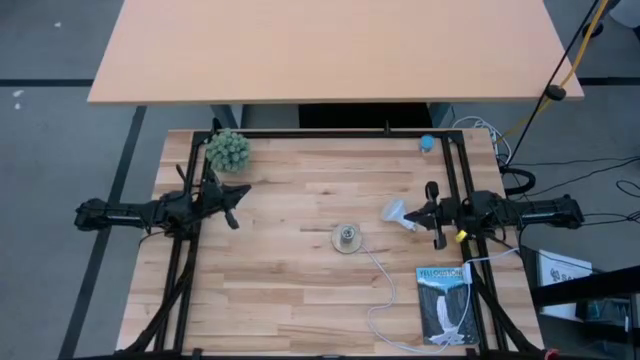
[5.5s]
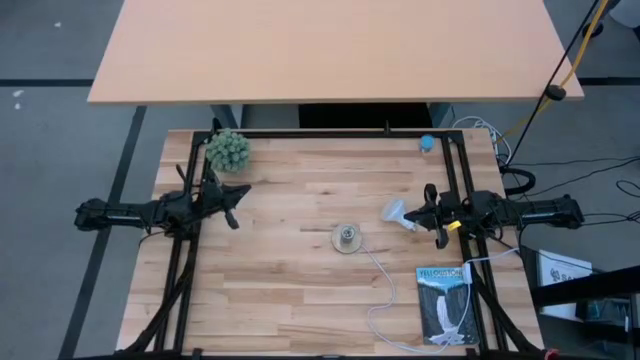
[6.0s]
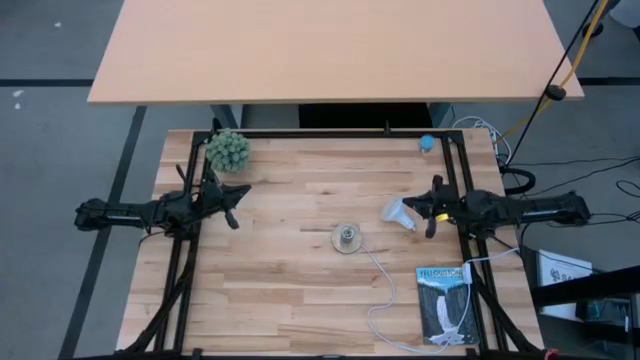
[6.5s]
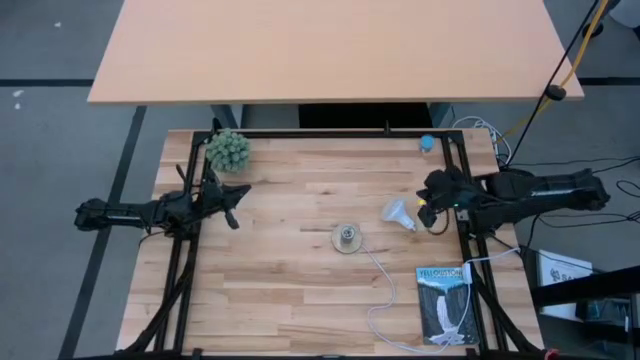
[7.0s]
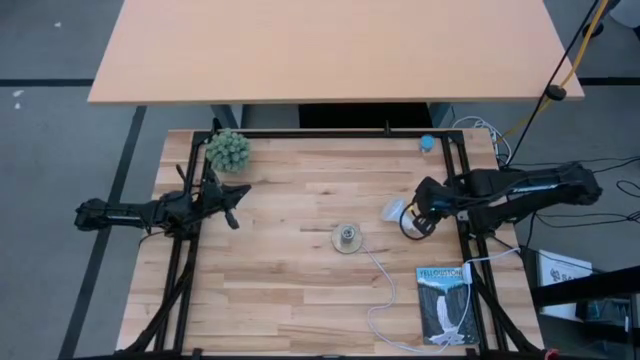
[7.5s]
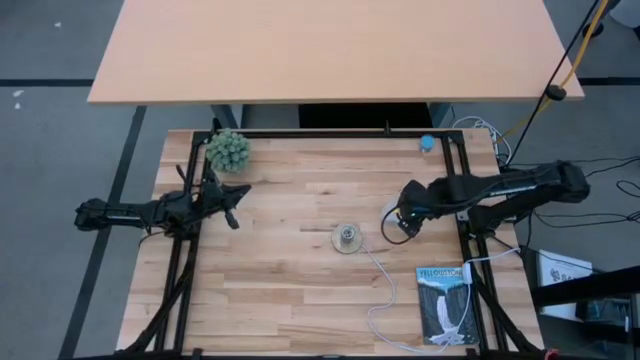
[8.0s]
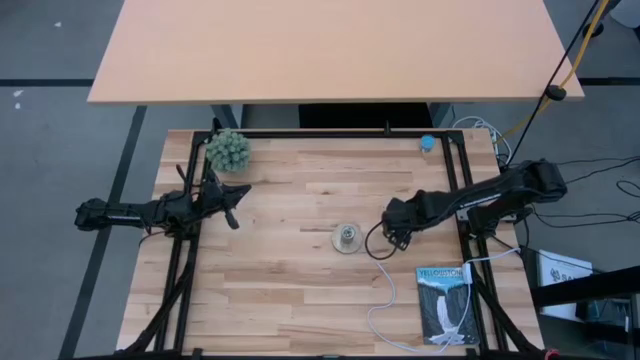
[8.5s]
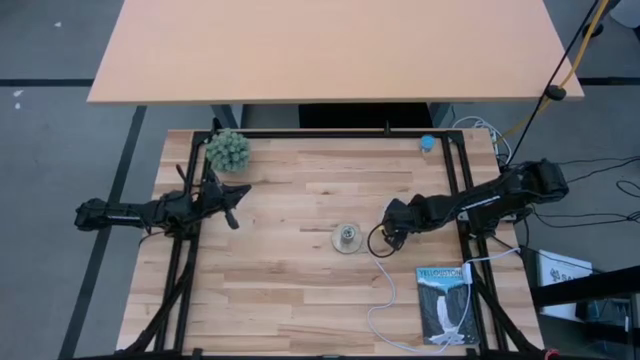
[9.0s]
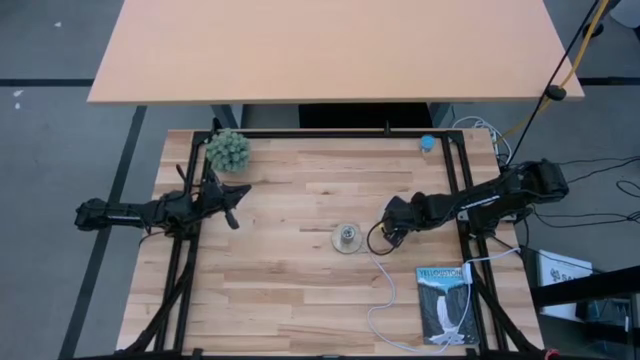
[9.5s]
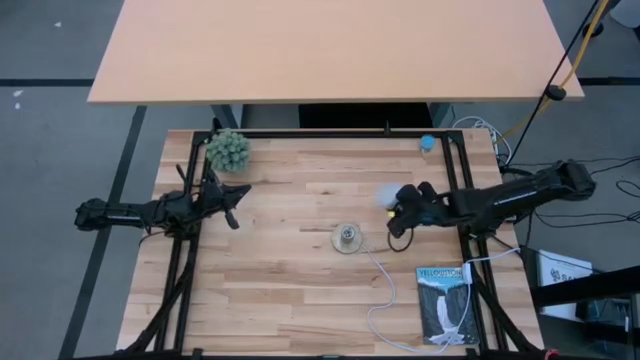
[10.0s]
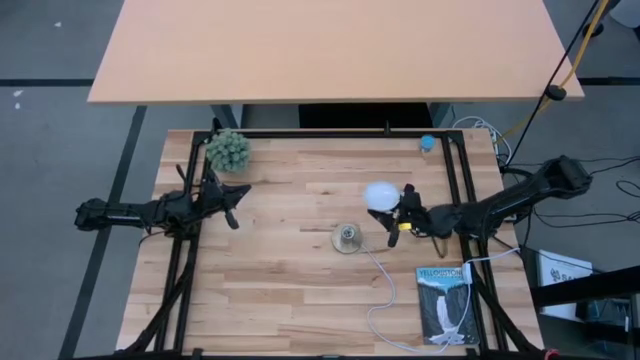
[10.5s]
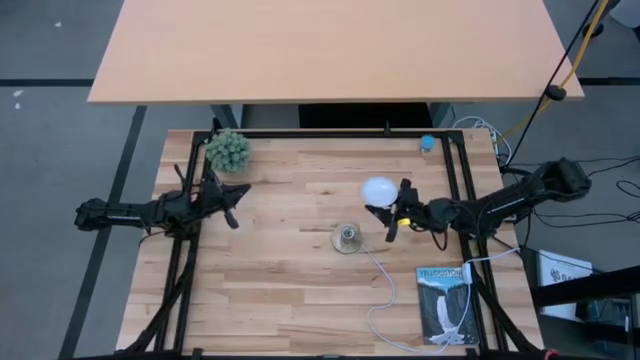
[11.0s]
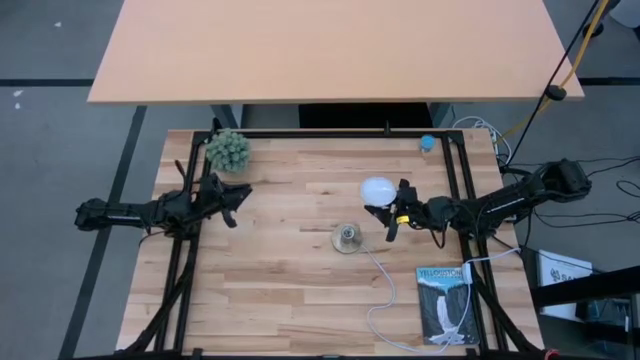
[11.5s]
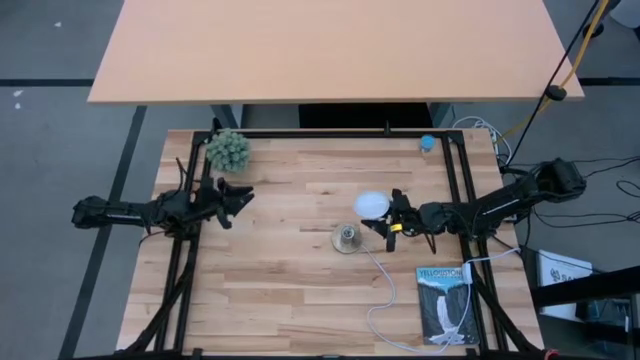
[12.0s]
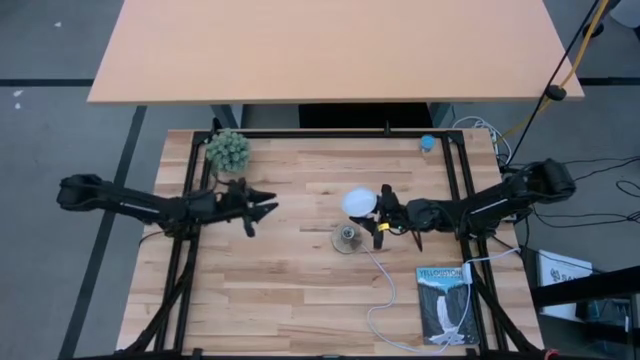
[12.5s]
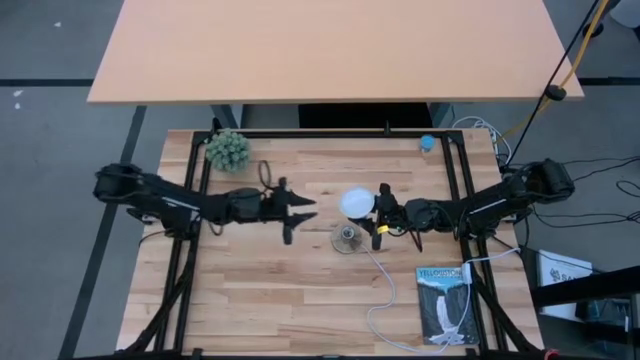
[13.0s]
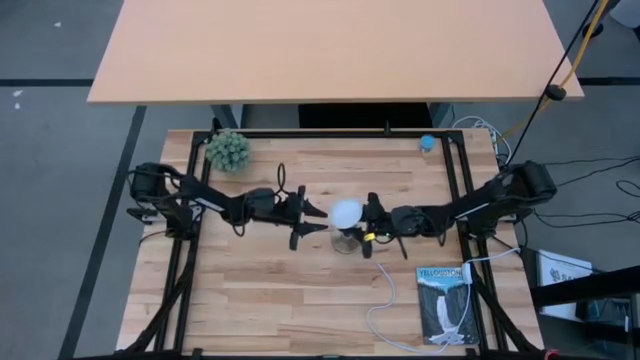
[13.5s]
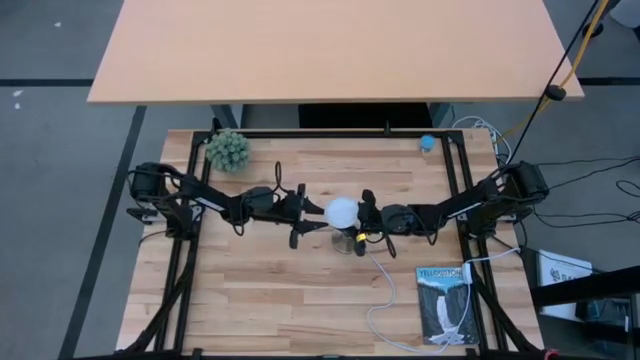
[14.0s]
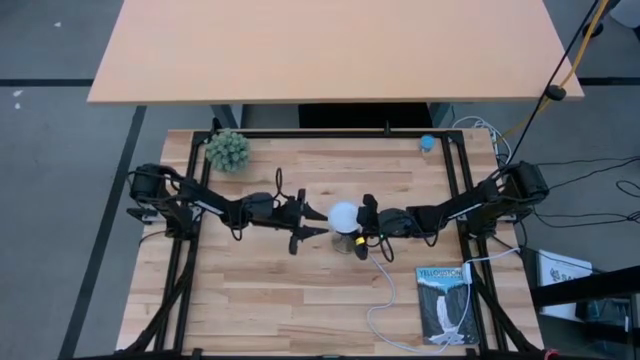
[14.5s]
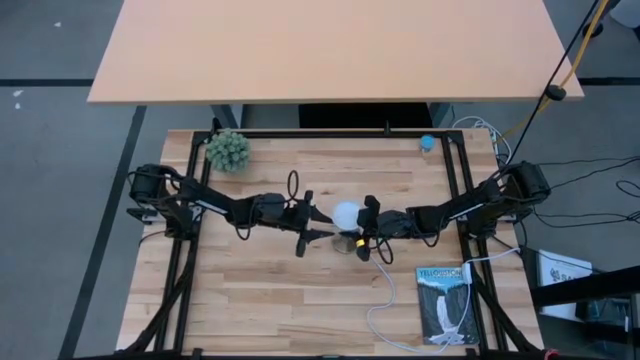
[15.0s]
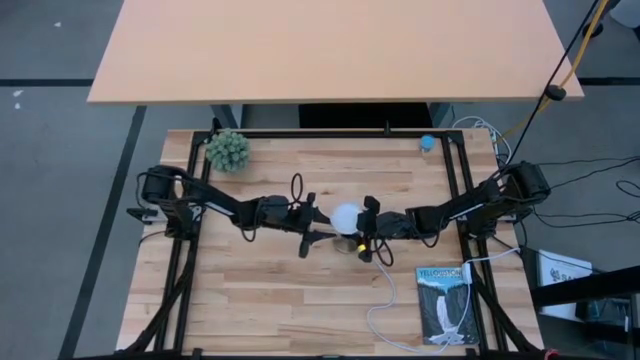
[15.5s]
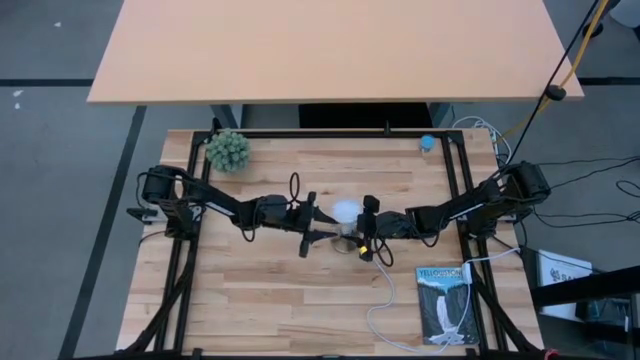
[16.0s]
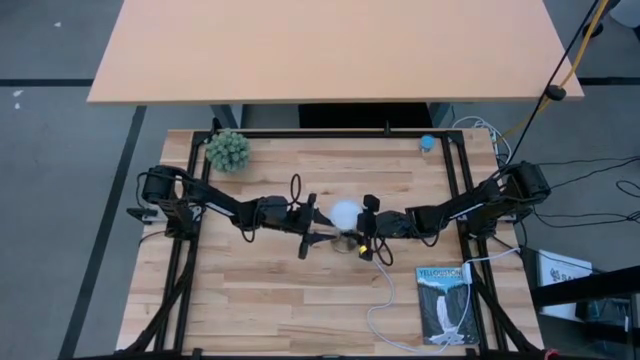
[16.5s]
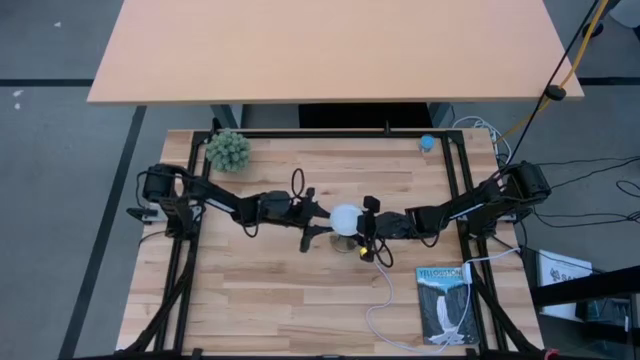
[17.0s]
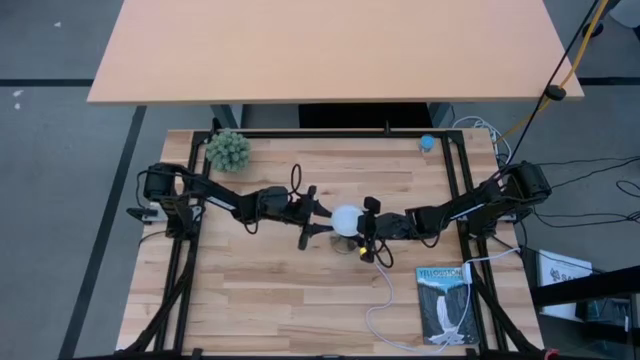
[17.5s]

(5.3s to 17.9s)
Task: Screw lightbulb
Insert the light bulb into the lamp

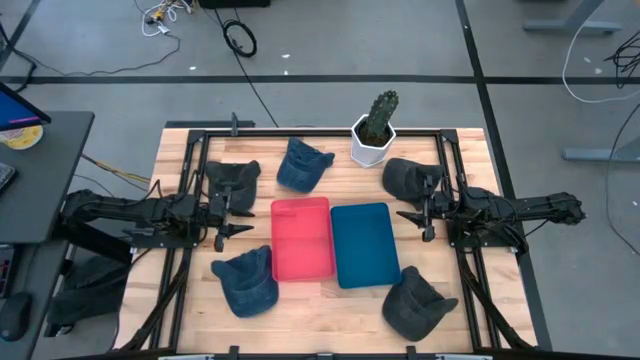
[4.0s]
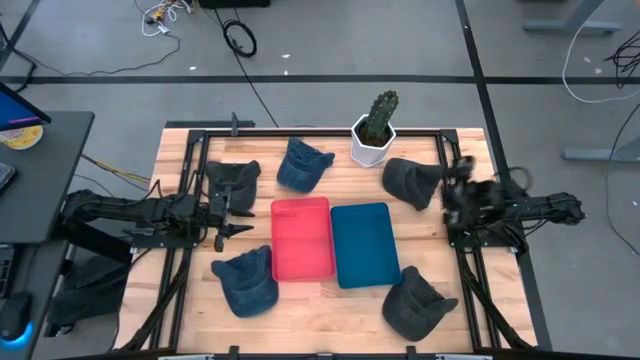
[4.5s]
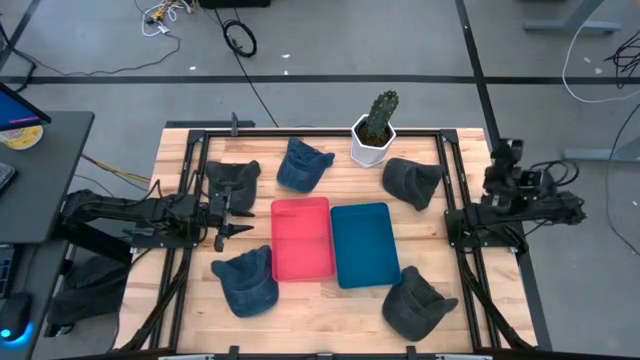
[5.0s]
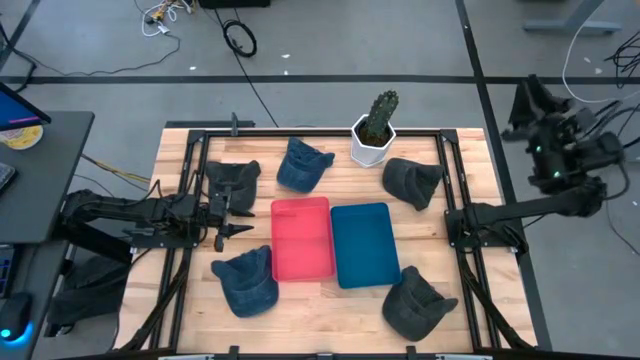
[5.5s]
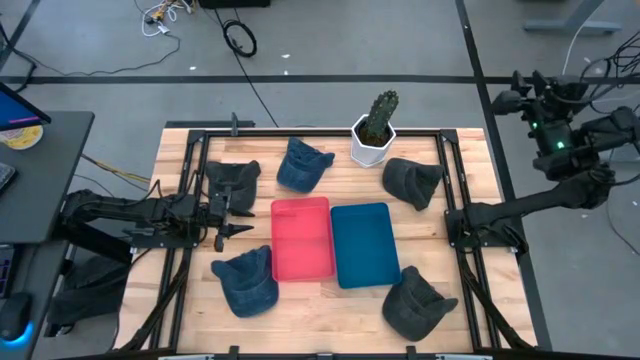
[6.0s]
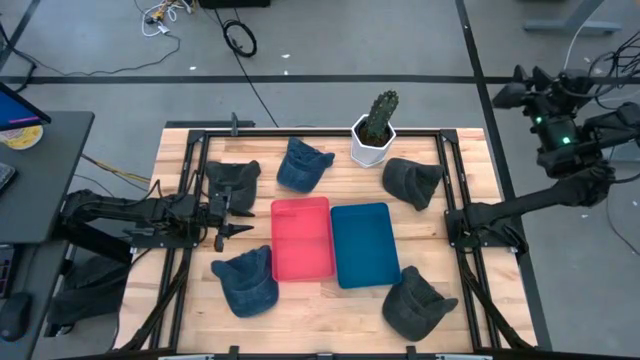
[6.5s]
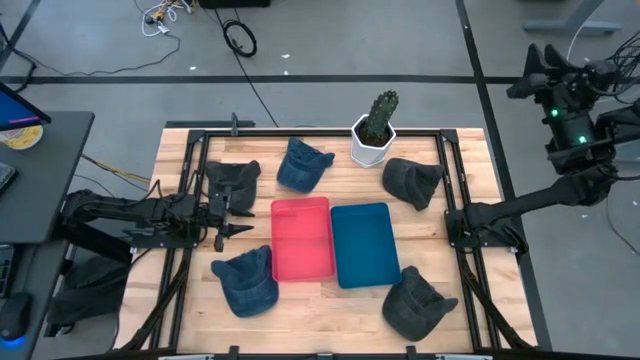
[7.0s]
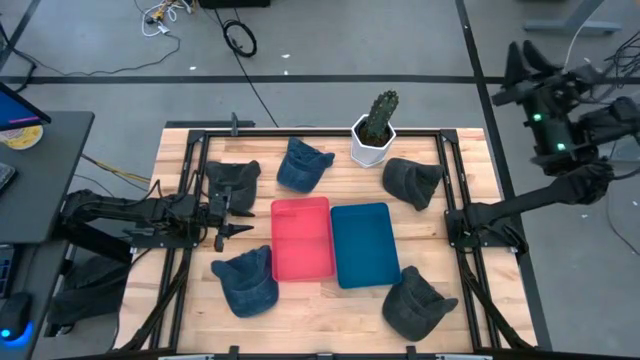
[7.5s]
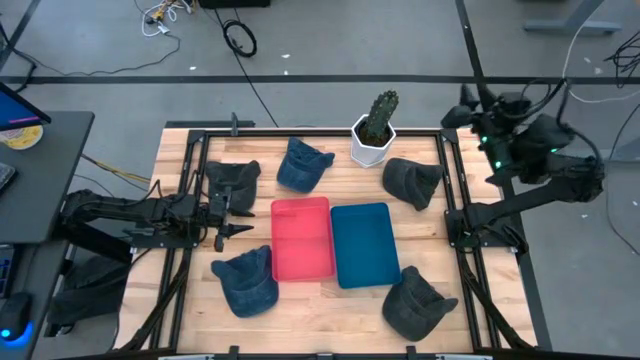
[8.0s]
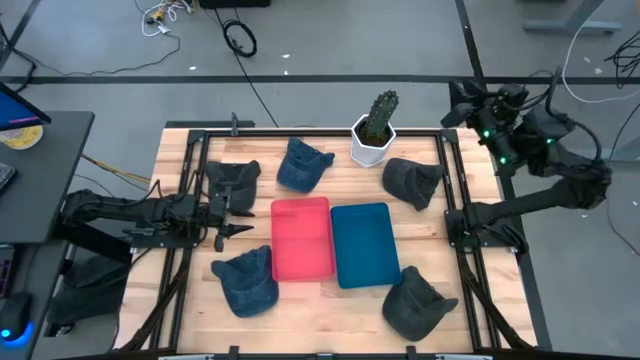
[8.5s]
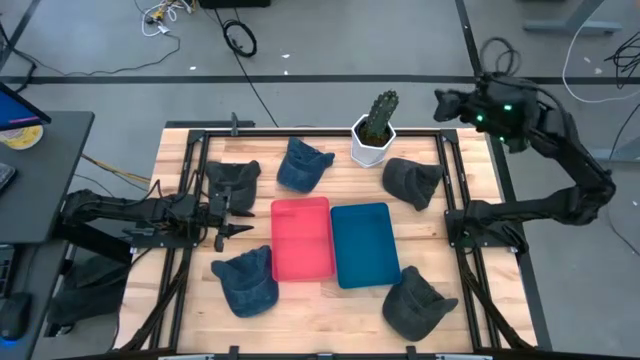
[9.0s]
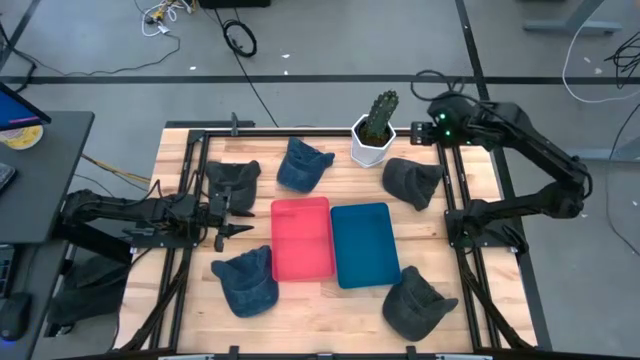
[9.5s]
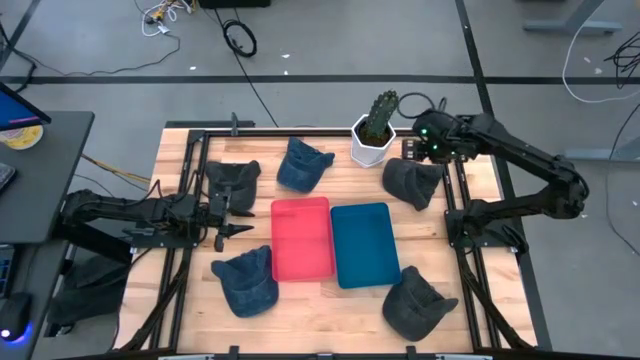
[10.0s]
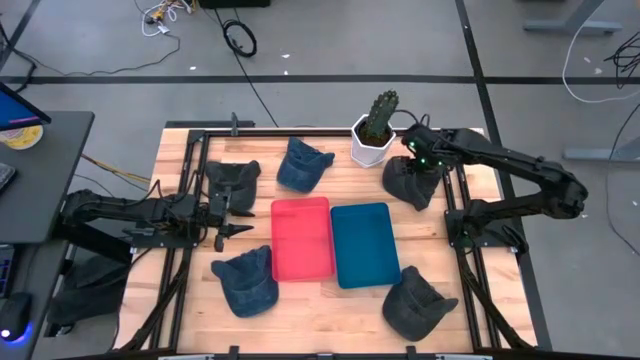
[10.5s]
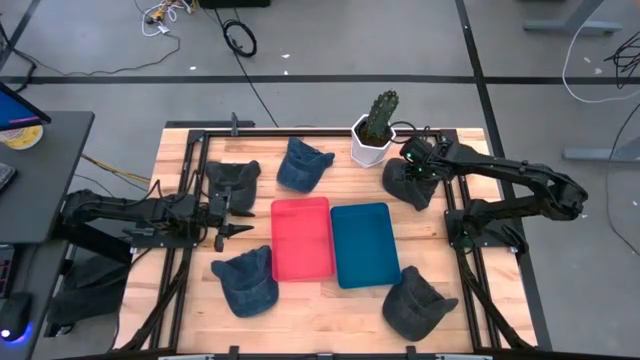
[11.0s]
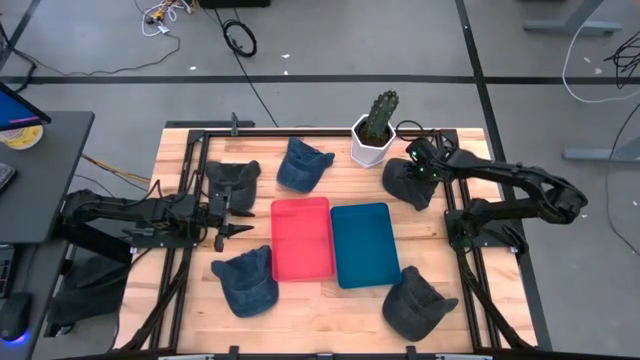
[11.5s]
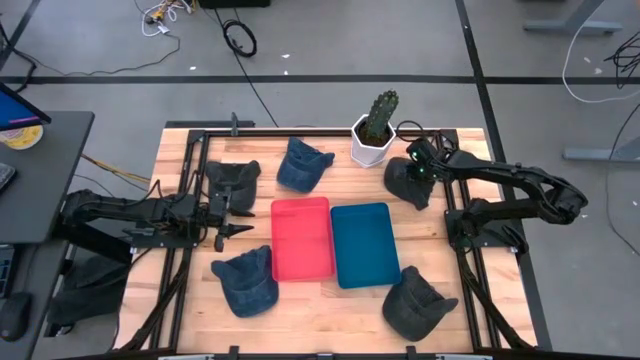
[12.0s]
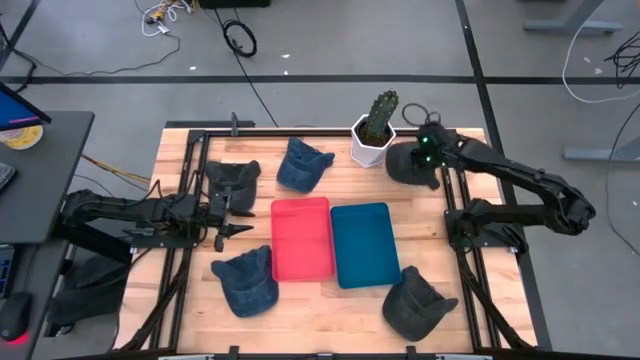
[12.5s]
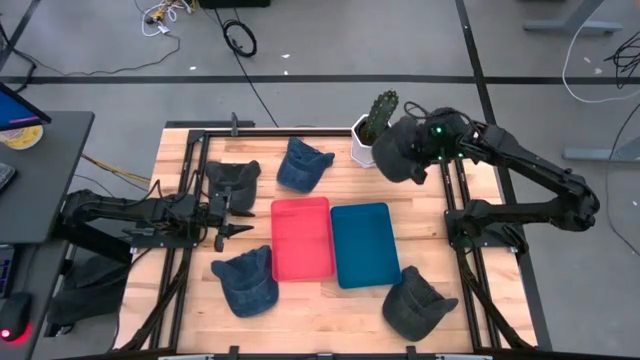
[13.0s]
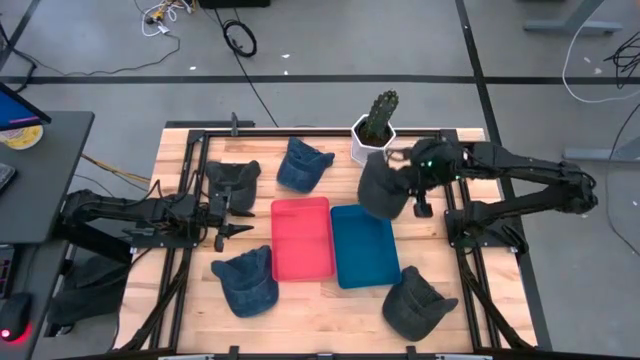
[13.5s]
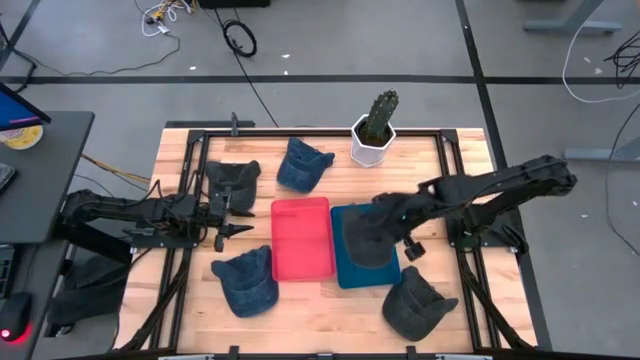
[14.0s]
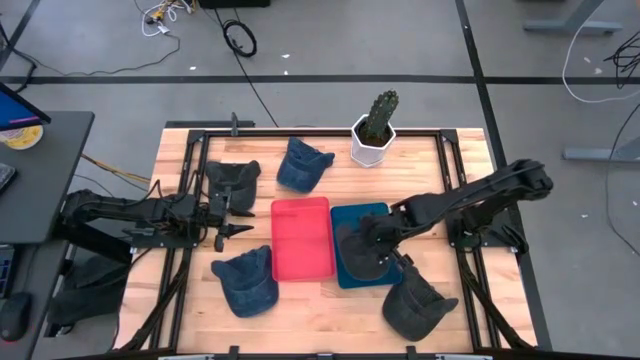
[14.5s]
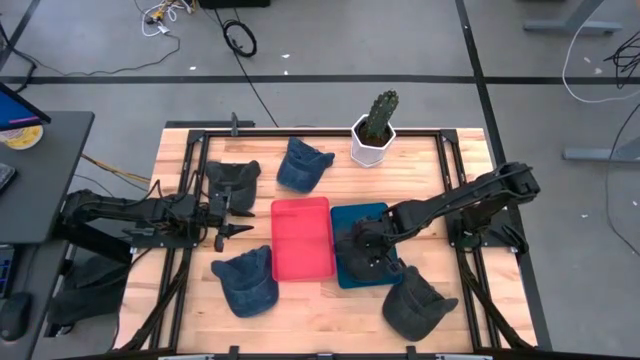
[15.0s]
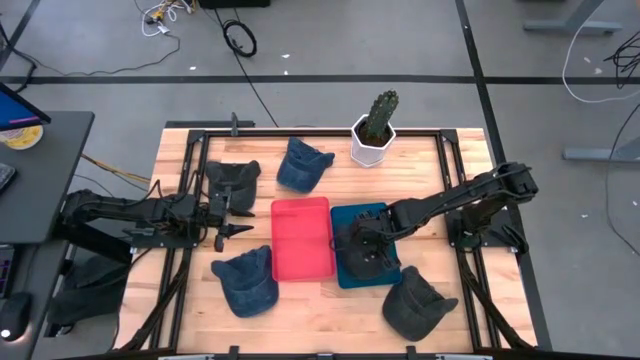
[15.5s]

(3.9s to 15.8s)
Task: Pick & Place hat
Put the top right black cap into the blue bin
